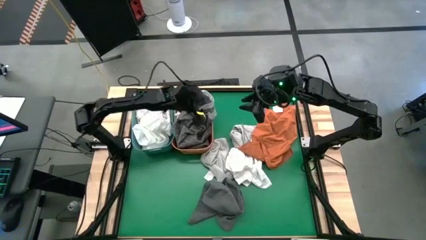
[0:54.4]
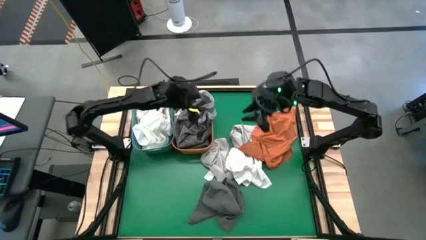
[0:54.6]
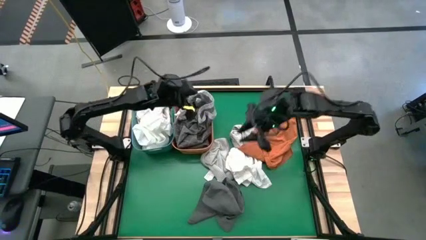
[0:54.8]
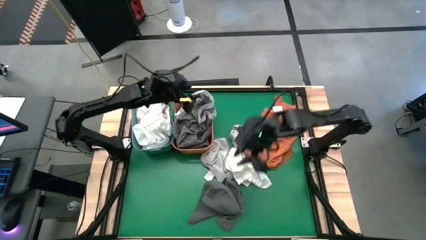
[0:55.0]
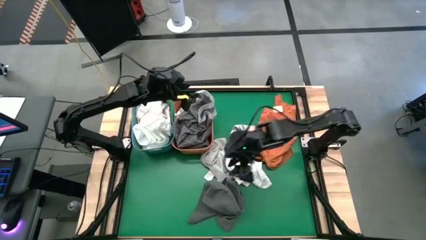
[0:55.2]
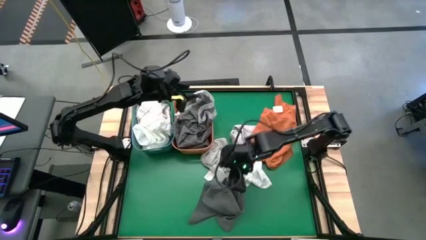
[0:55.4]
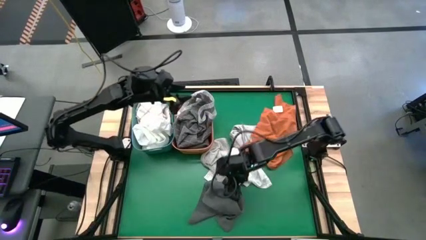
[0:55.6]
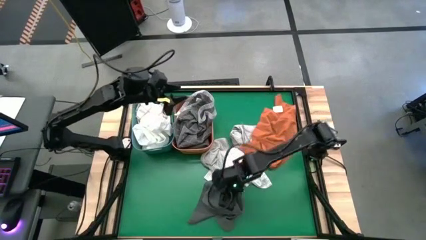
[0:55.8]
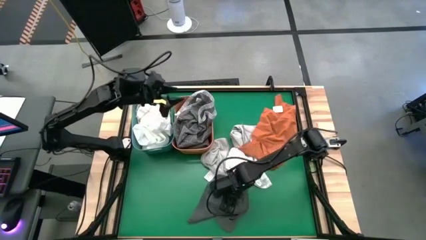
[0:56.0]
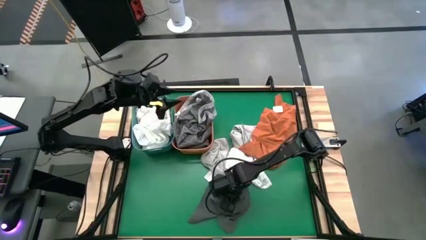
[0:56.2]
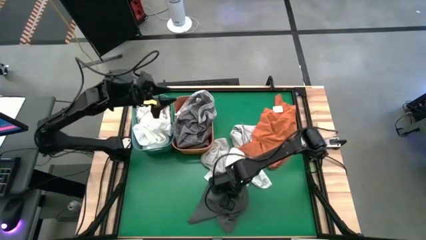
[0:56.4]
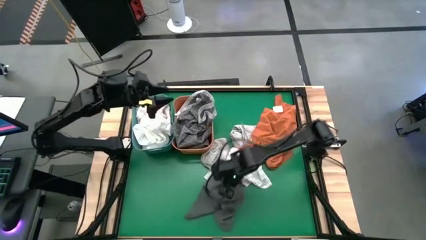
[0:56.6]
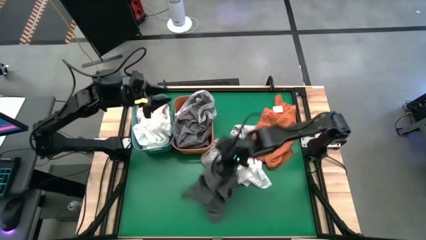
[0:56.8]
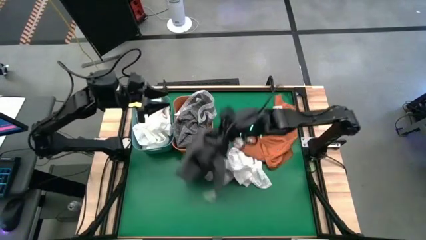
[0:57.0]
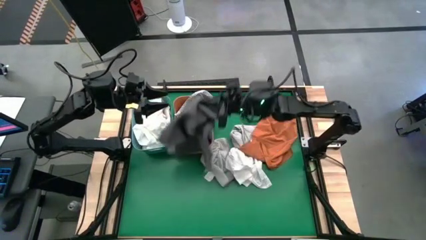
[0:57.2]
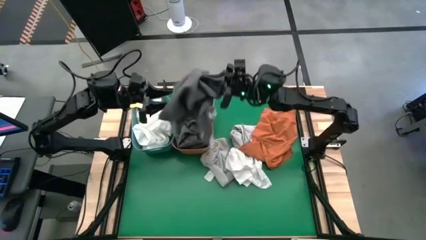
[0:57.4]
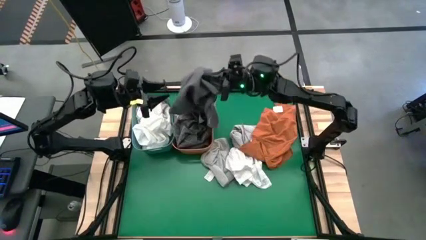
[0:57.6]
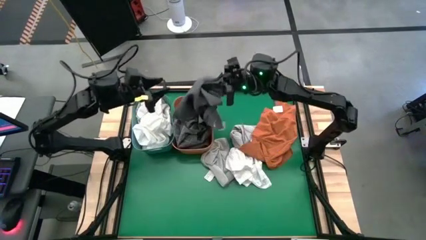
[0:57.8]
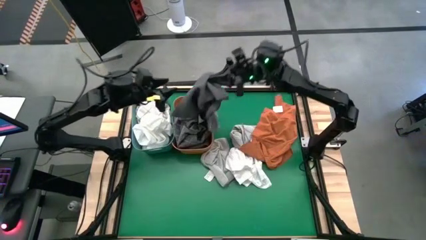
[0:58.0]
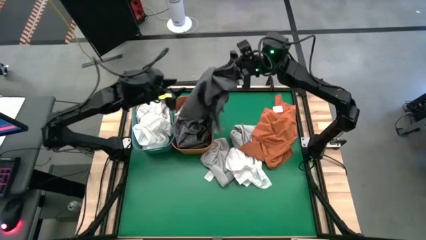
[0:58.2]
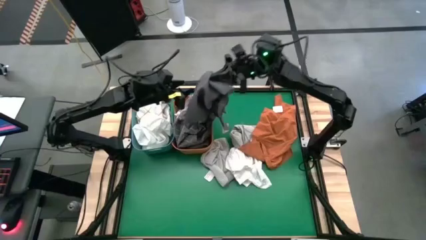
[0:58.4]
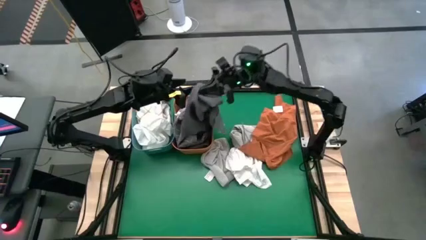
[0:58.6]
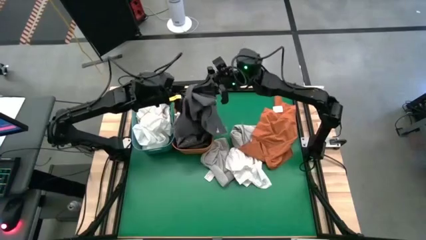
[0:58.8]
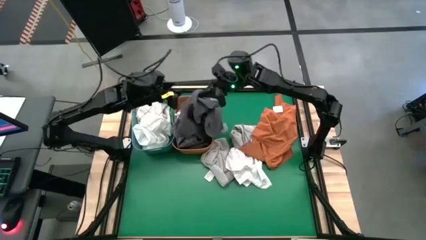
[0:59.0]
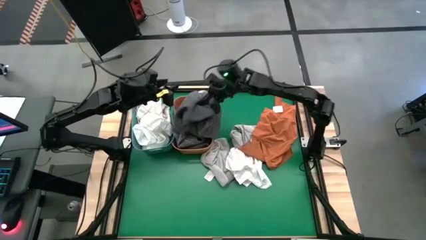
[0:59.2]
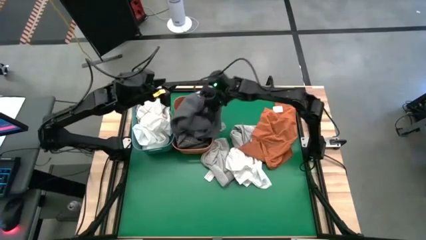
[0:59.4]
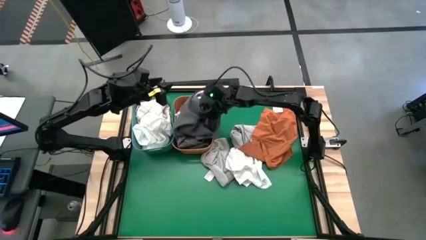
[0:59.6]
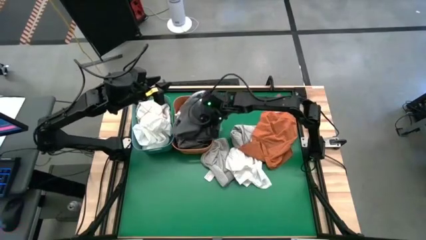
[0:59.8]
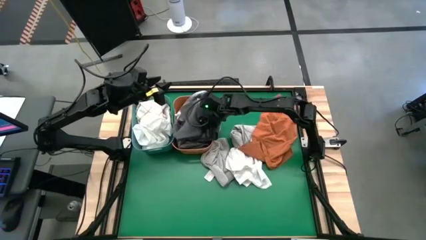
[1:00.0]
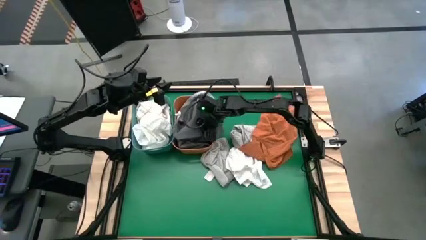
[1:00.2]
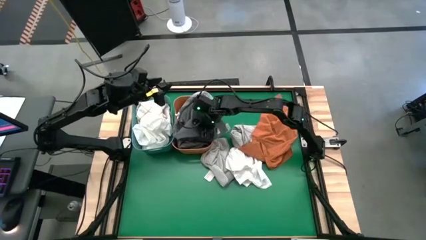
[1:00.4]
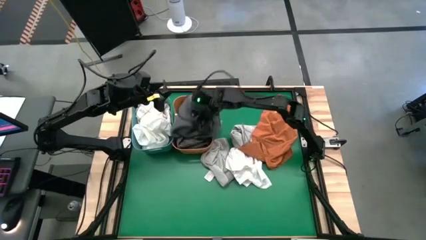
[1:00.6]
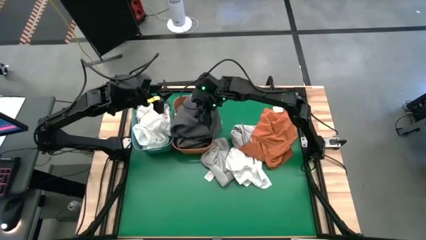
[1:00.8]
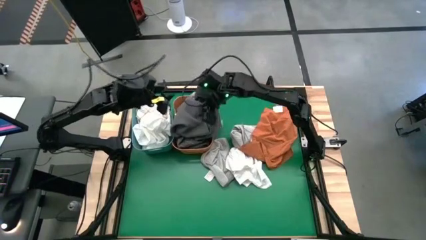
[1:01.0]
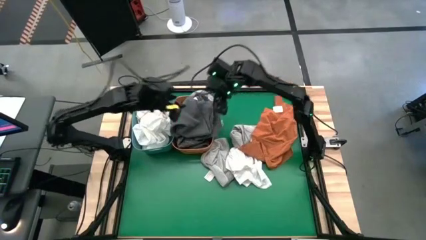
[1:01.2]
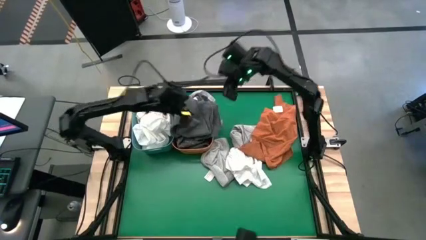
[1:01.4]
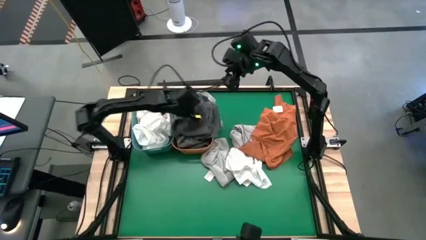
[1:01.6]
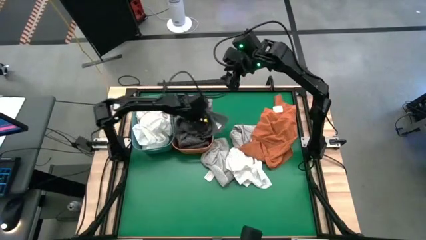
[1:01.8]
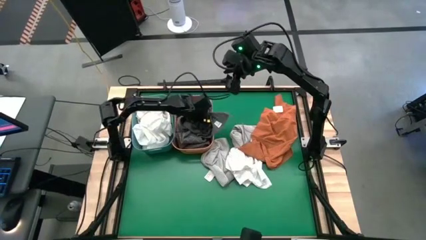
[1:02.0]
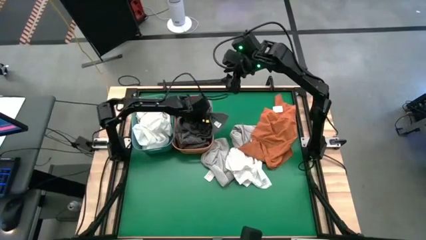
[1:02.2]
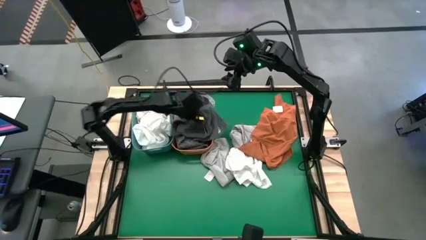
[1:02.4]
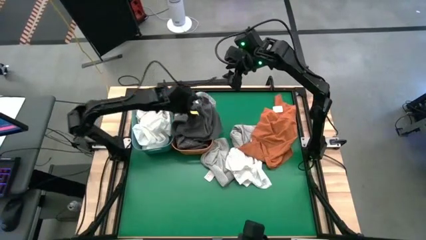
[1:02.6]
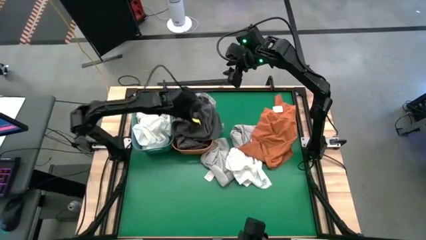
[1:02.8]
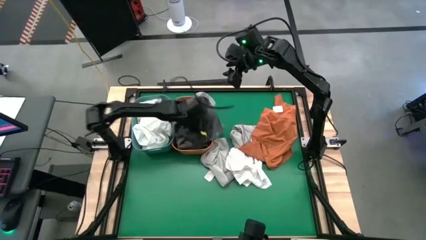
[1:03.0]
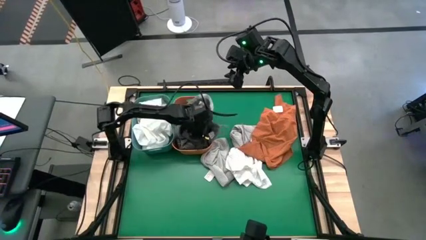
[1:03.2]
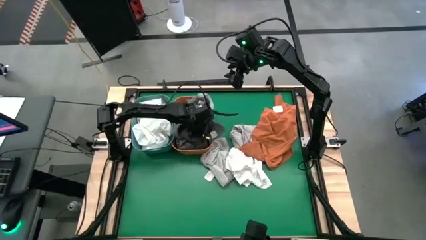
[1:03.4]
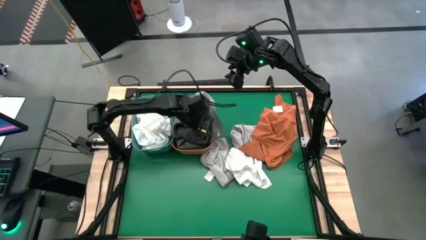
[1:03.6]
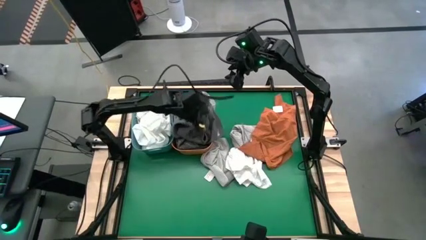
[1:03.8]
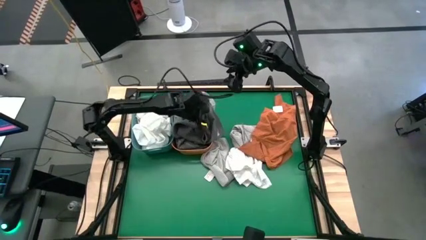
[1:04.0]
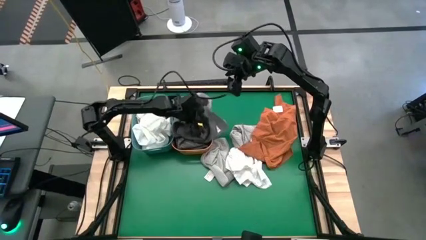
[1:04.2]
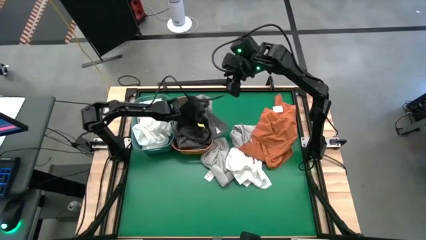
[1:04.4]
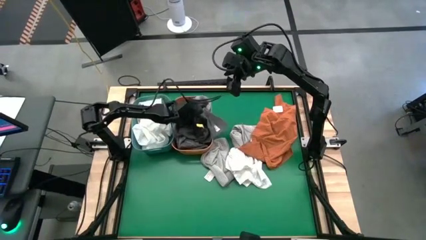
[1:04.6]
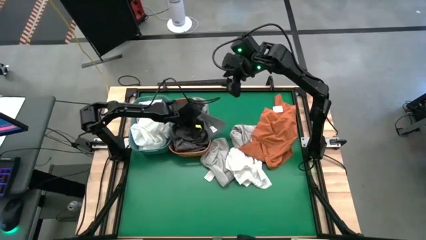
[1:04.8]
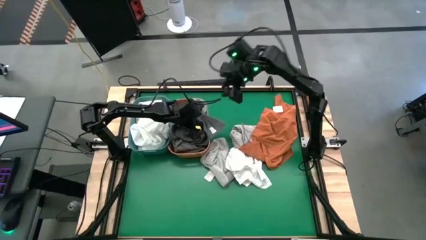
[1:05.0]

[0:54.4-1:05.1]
Task: Sort towels by color in basket
Put the black towel into the orange bin

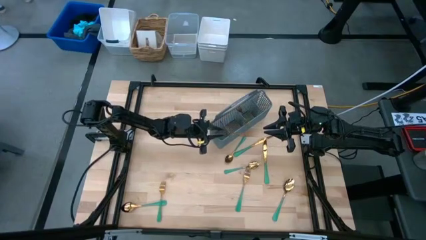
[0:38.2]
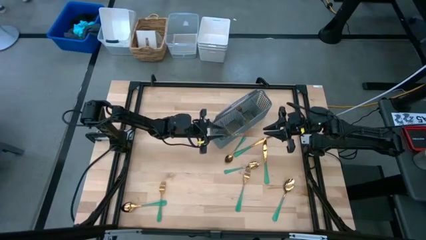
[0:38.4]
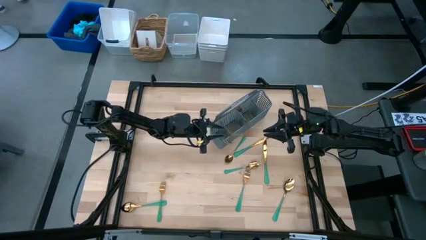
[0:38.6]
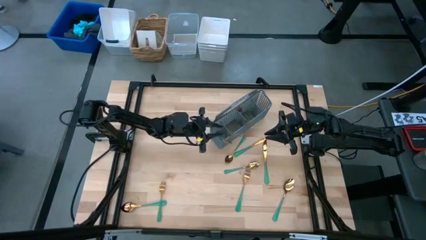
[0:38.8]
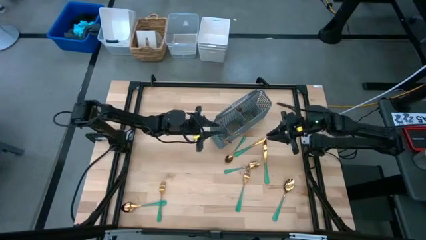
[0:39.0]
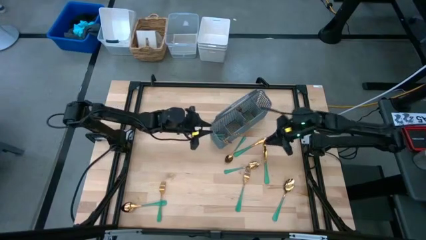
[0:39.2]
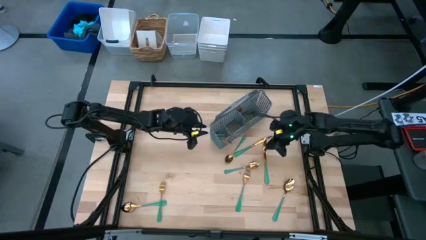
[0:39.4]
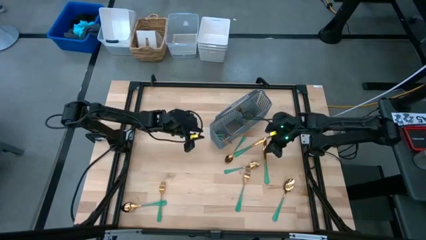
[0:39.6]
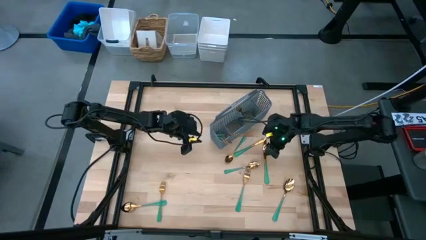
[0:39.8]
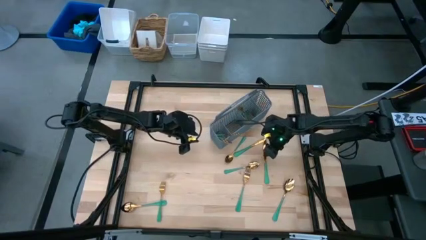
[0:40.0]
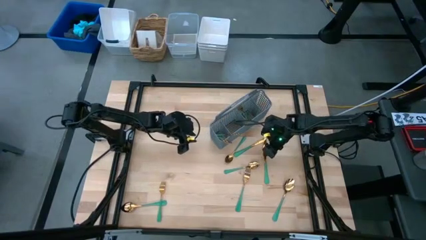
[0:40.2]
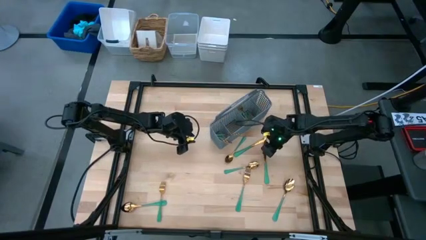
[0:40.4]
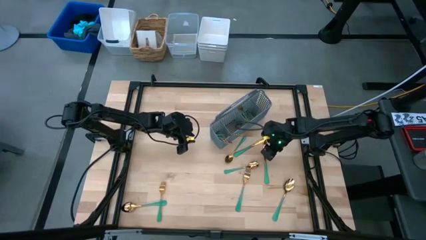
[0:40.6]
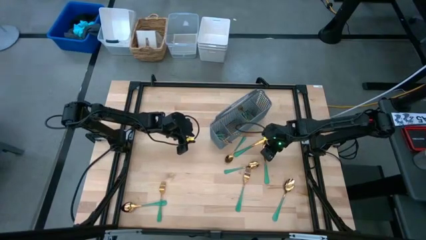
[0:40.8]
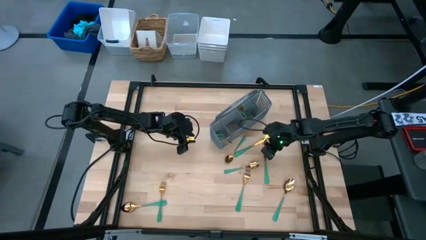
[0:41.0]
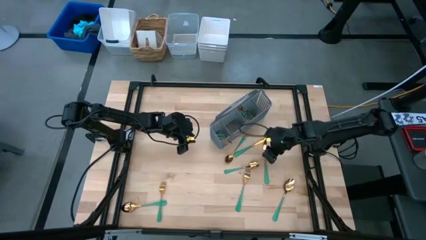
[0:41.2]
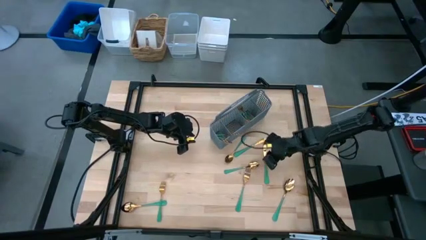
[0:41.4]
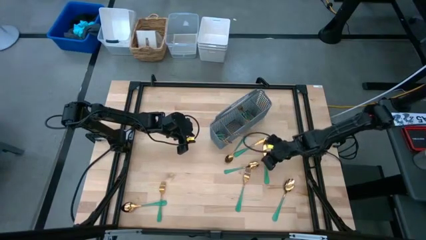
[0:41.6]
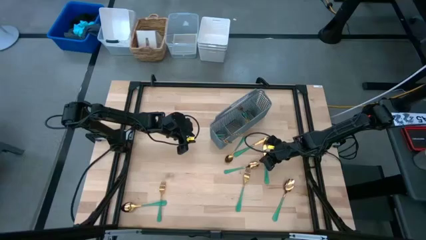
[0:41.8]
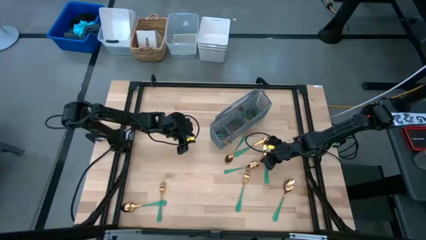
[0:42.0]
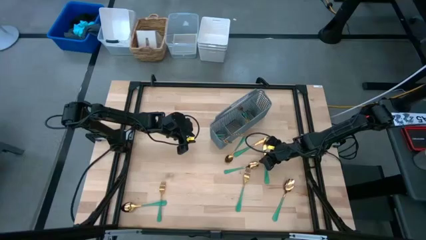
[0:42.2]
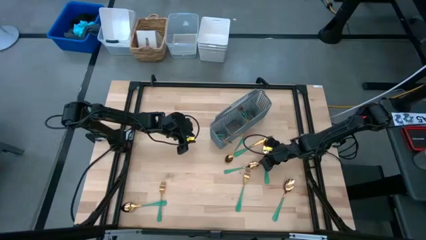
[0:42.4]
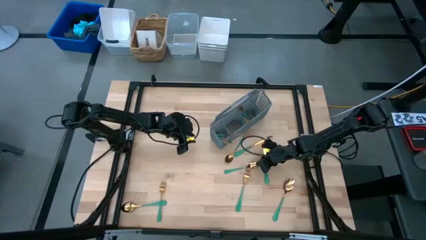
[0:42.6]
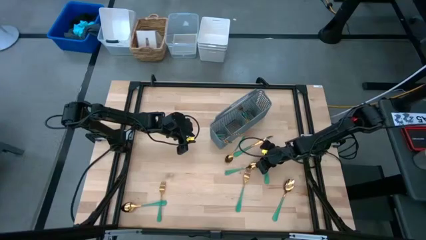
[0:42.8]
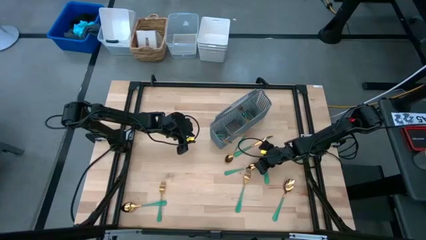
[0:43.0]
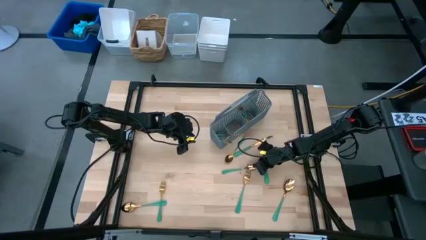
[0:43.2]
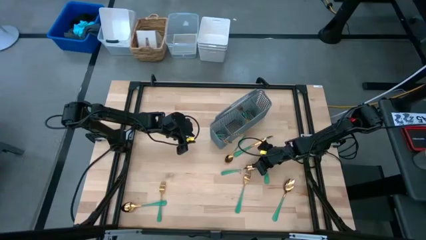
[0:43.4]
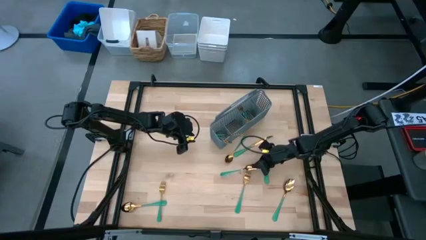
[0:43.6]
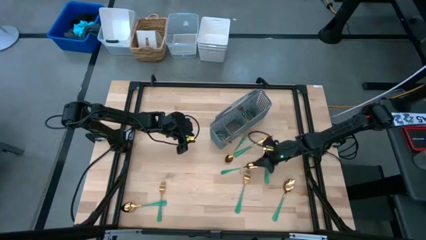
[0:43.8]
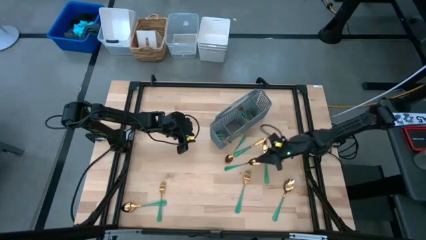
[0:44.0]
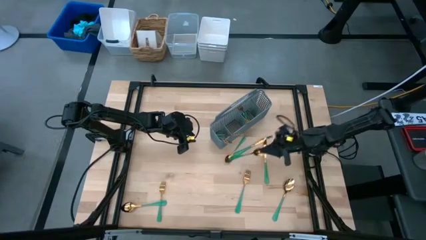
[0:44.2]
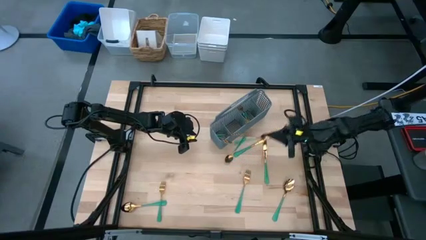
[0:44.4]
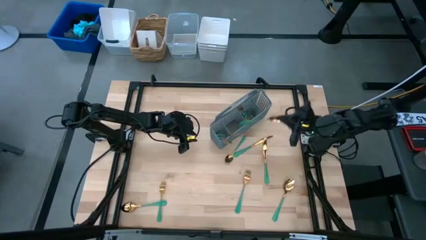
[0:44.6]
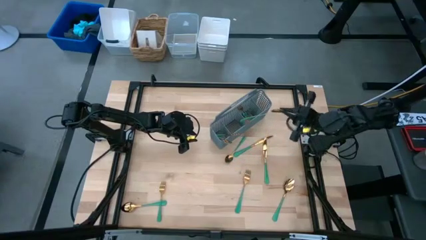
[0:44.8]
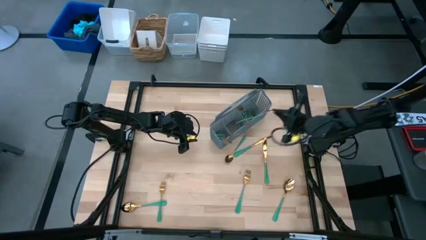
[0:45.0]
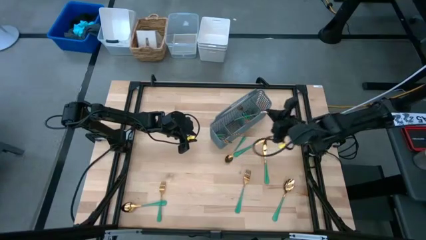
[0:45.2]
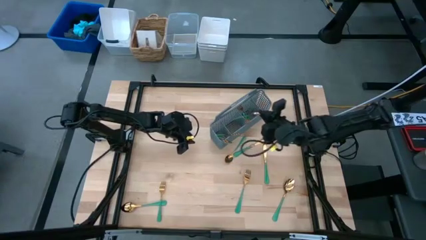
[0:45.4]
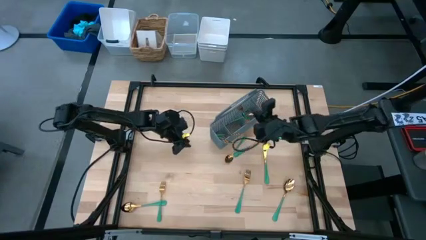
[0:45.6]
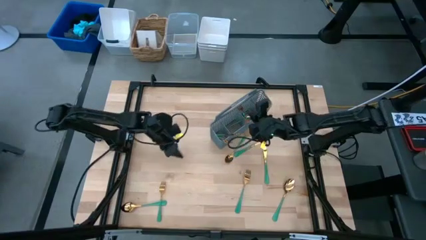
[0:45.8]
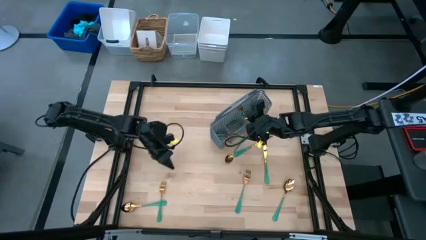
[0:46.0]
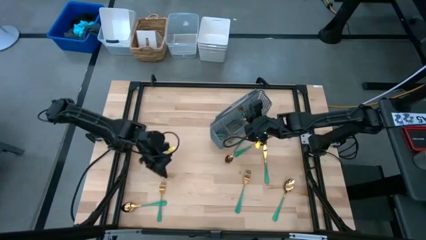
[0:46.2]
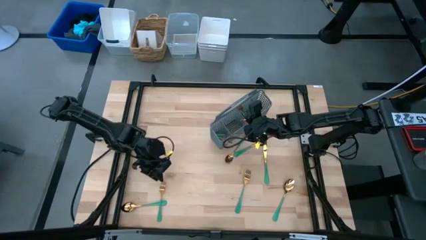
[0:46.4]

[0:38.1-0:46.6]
Task: Sort silverware
Put the middle spoon into the basket
